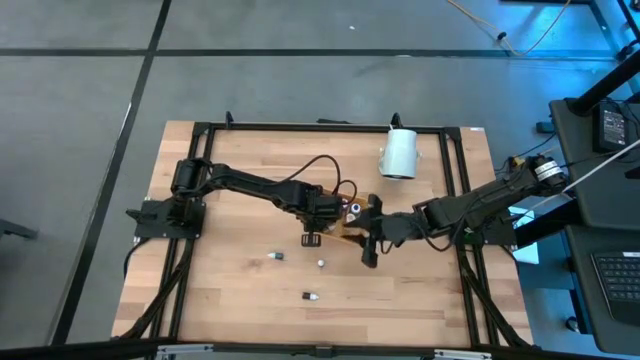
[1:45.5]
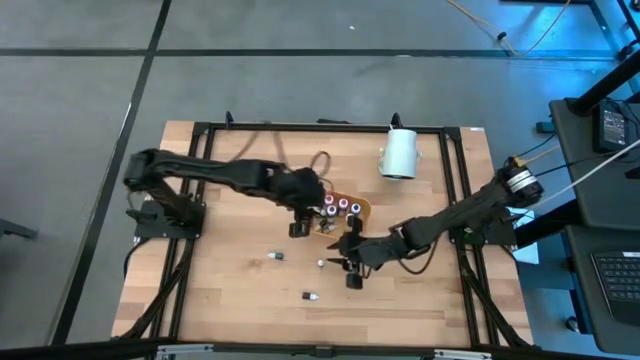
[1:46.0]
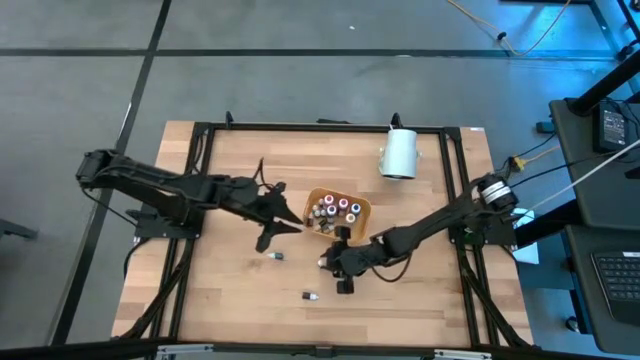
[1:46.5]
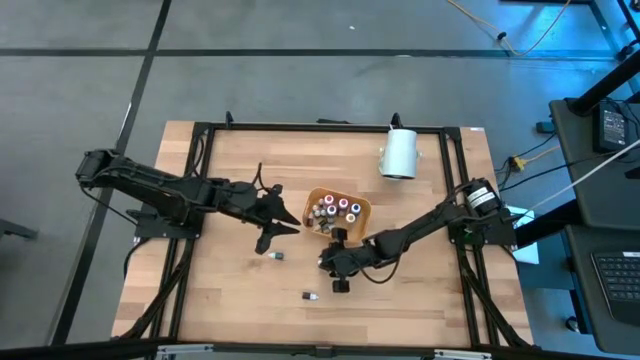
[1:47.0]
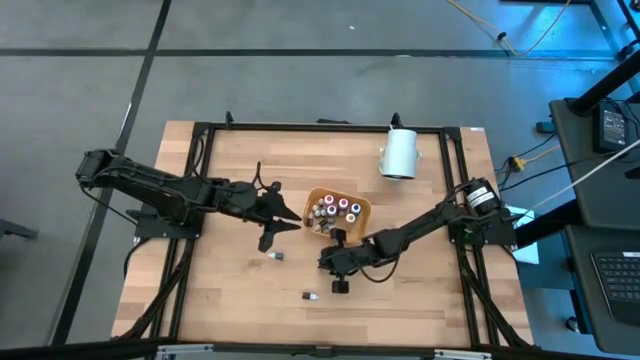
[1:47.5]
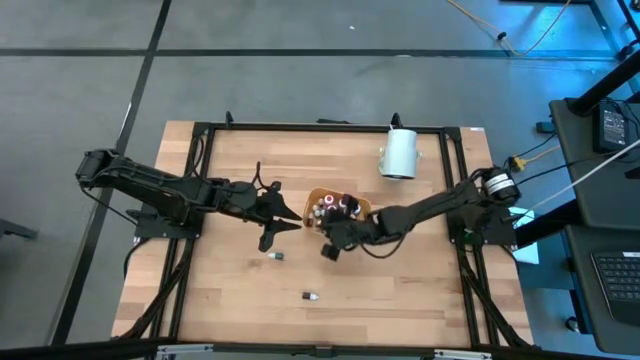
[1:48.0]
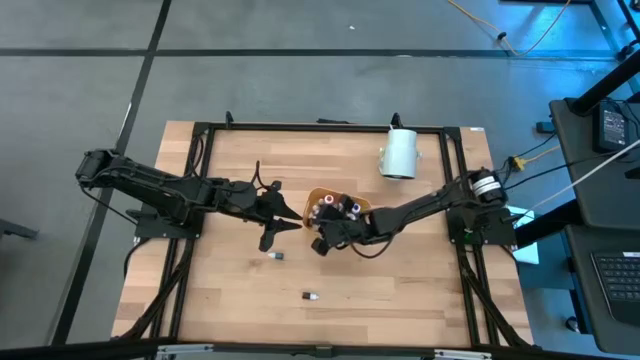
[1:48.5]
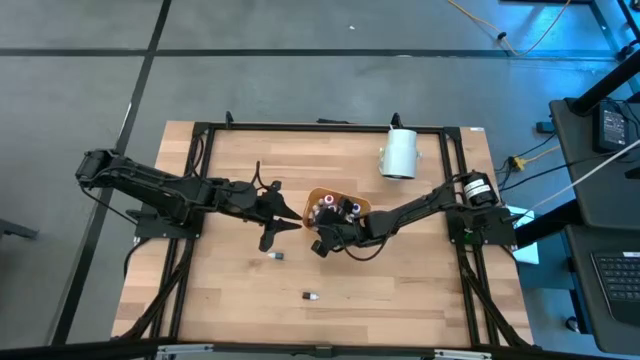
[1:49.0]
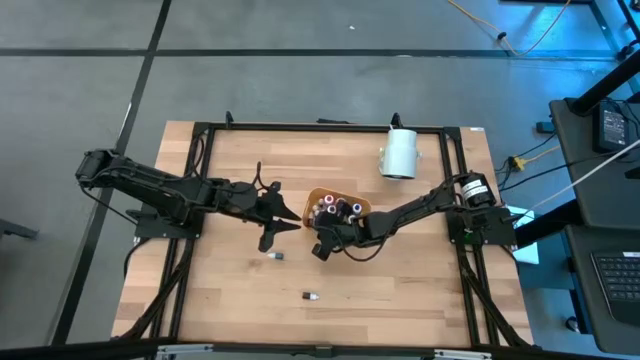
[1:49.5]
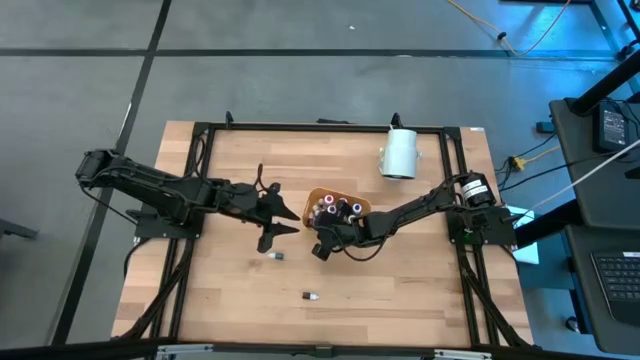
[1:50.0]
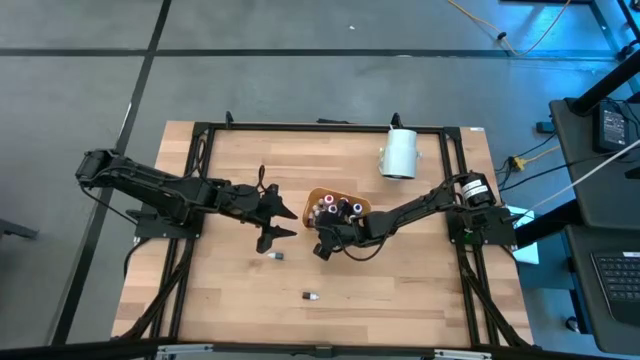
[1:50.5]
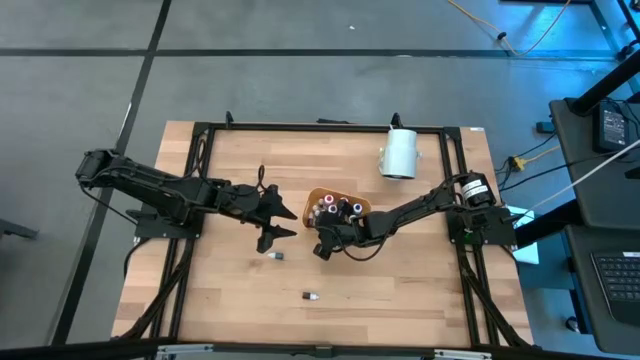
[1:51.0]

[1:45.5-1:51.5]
Task: Pick & Place food coloring
Put the small pink food coloring bottle into the yellow bin

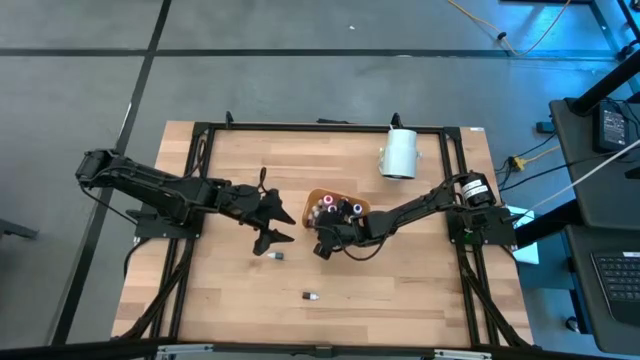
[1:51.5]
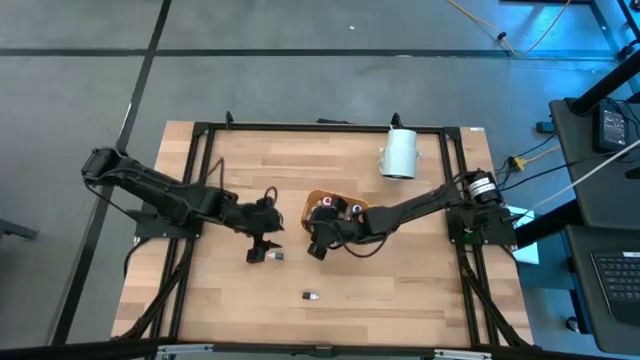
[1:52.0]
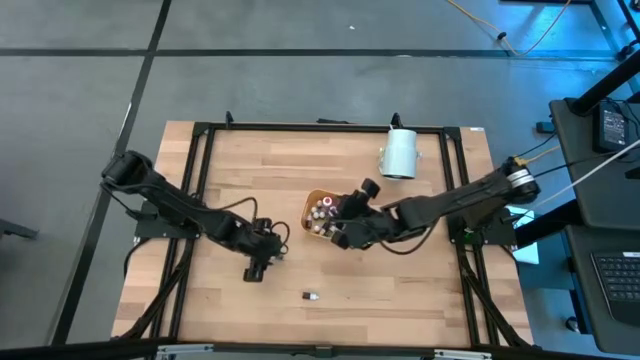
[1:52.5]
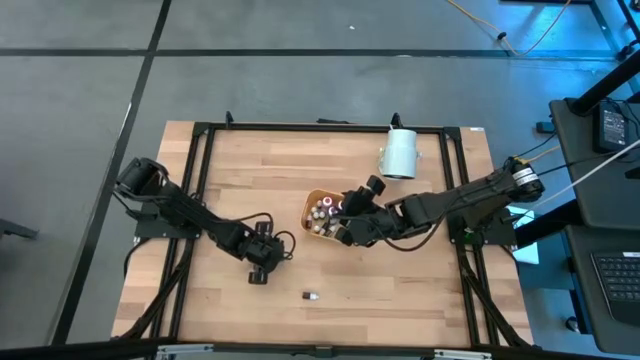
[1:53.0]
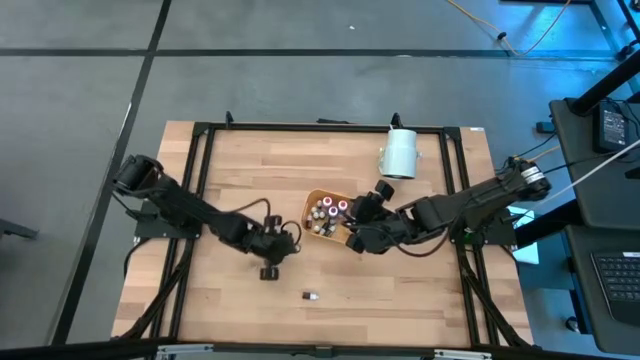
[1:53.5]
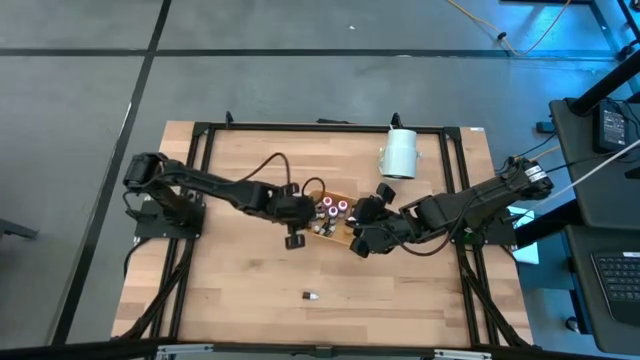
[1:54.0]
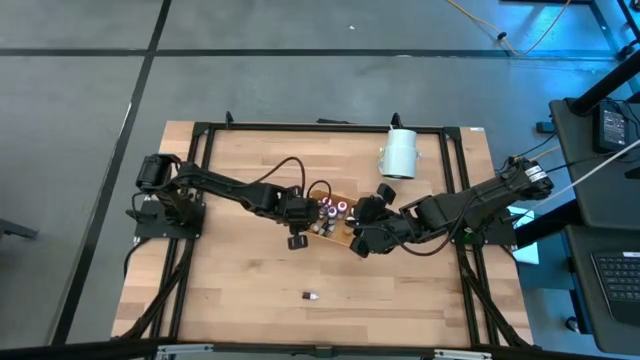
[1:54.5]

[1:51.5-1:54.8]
Put the small blue food coloring bottle into the yellow bin

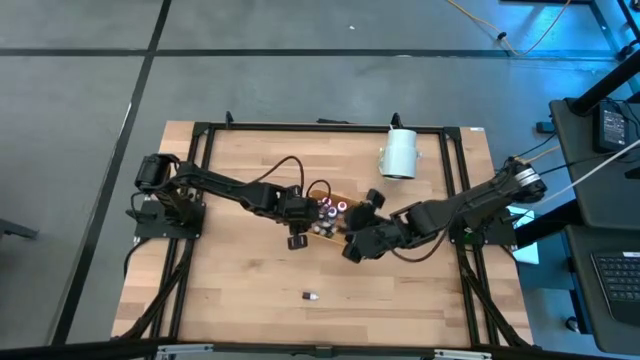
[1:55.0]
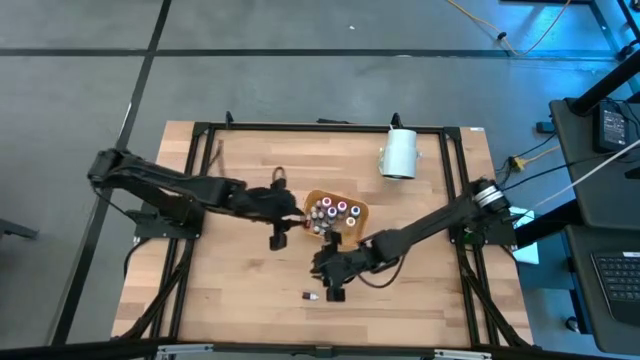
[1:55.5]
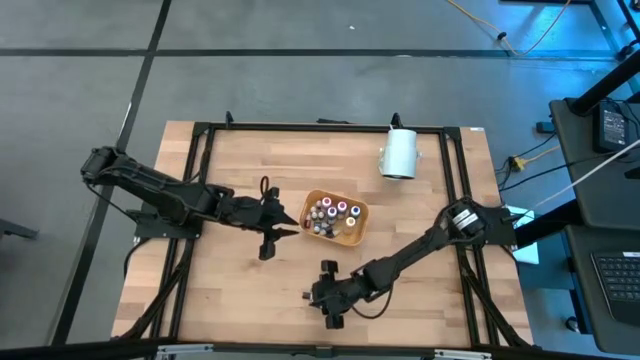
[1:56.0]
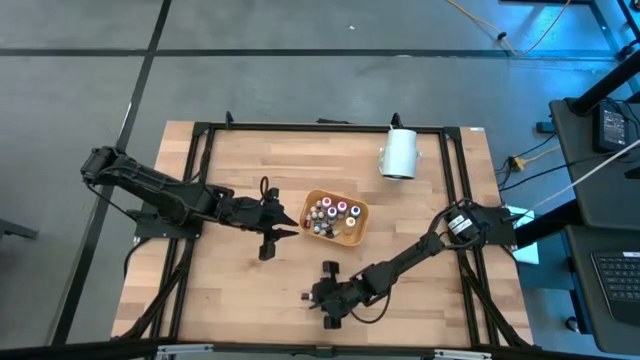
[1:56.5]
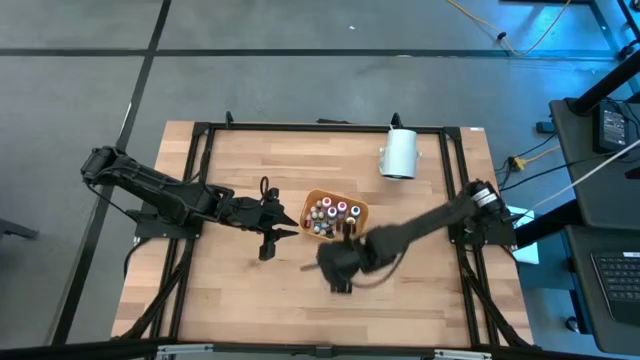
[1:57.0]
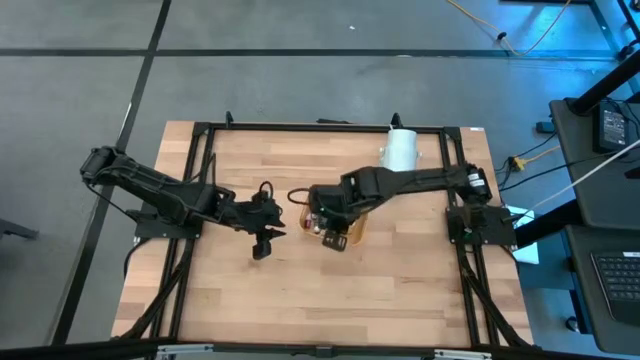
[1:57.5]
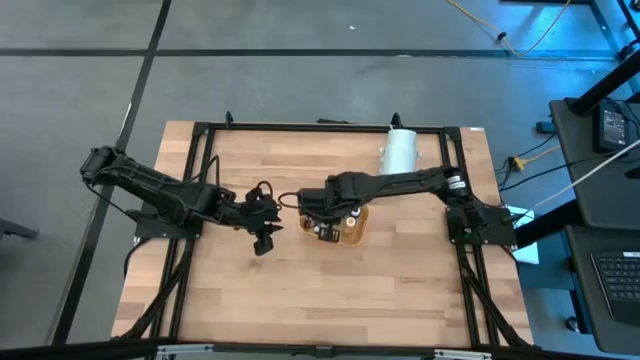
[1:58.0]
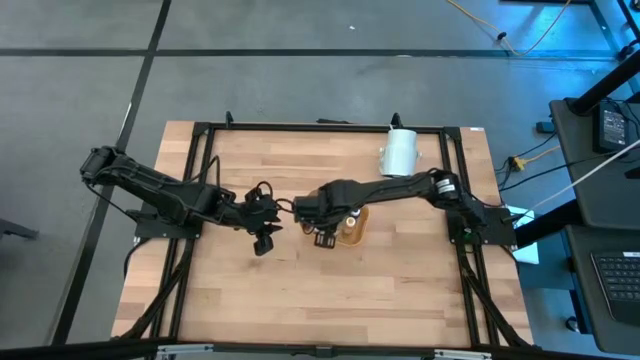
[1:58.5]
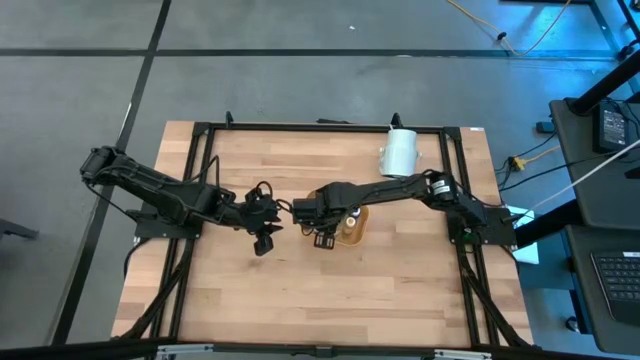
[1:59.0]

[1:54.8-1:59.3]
Put the small red food coloring bottle into the yellow bin

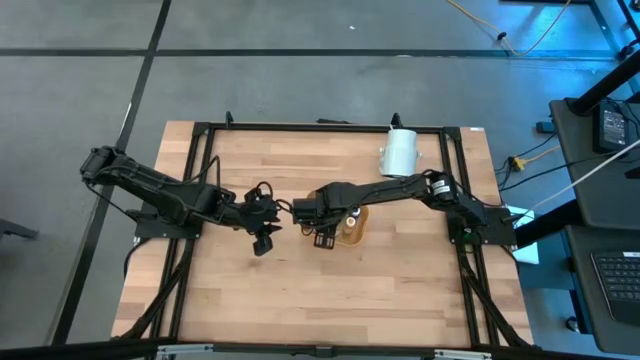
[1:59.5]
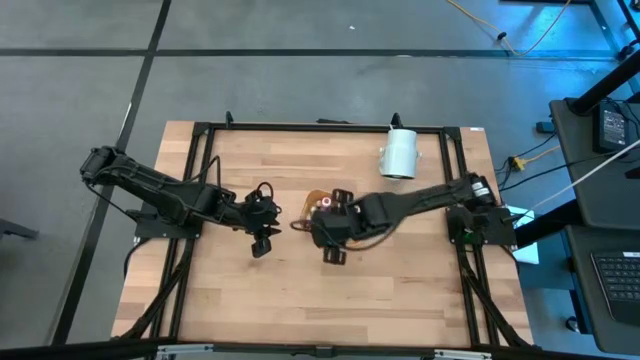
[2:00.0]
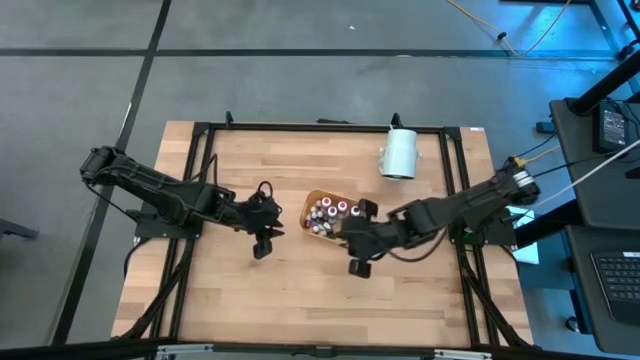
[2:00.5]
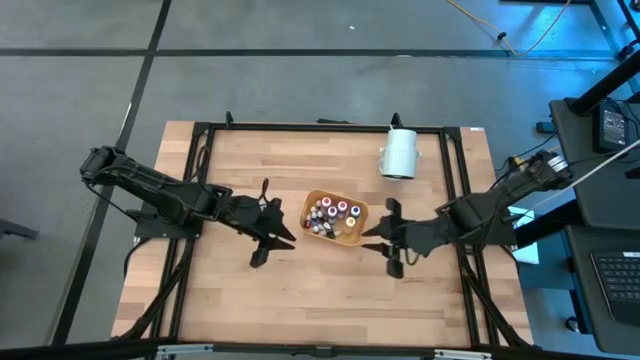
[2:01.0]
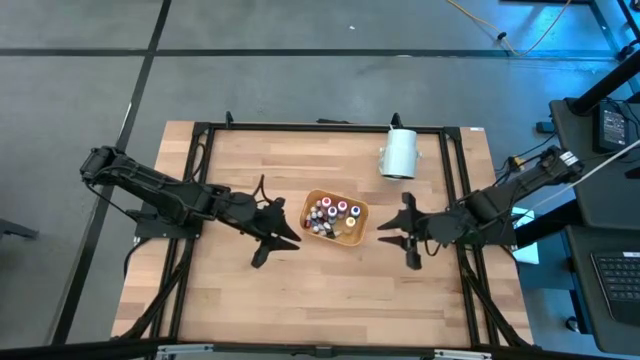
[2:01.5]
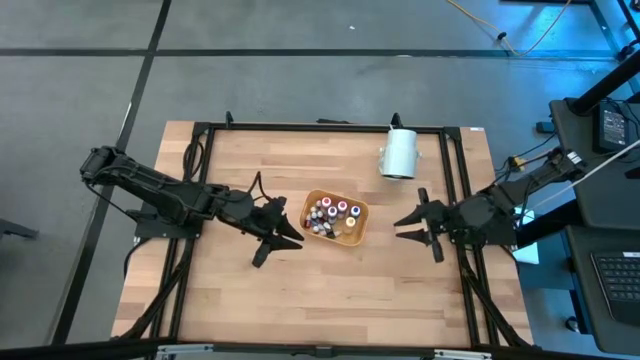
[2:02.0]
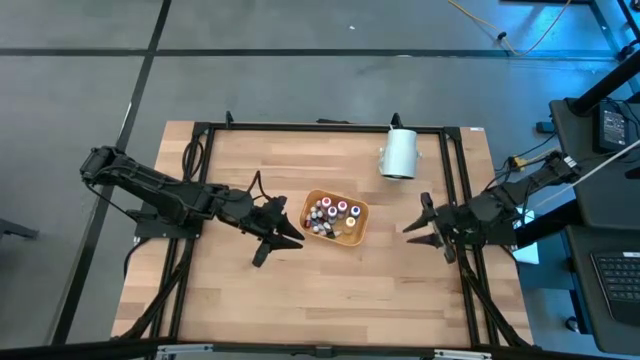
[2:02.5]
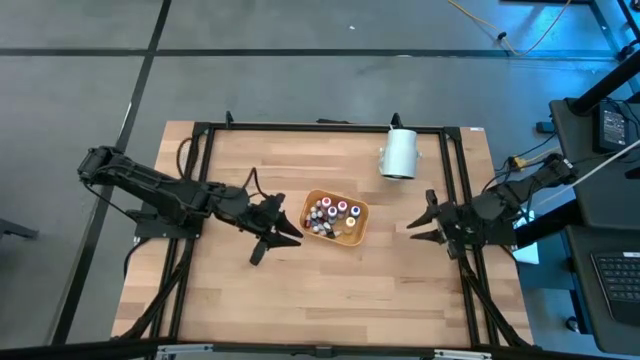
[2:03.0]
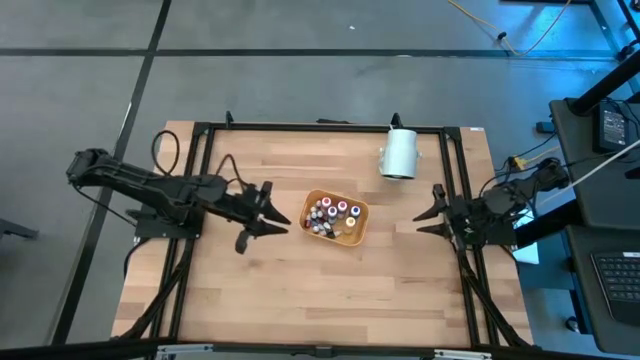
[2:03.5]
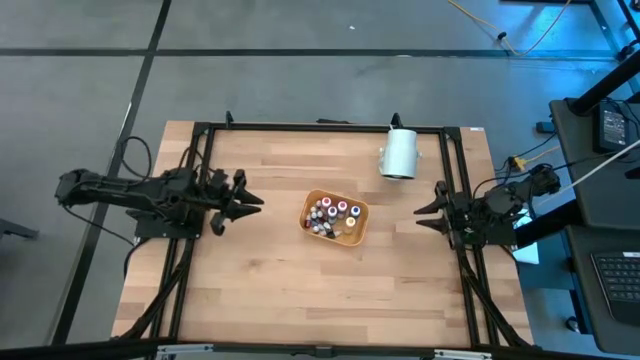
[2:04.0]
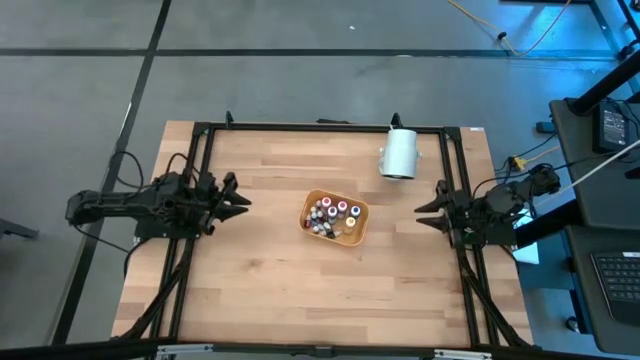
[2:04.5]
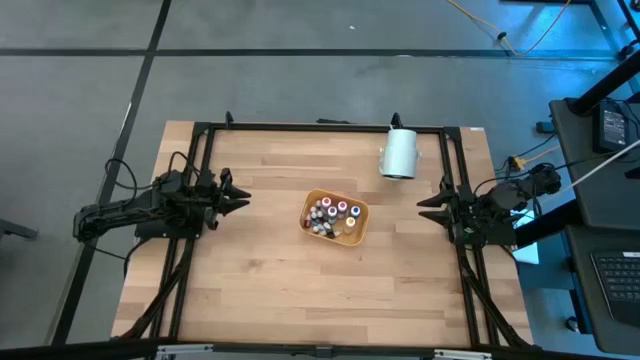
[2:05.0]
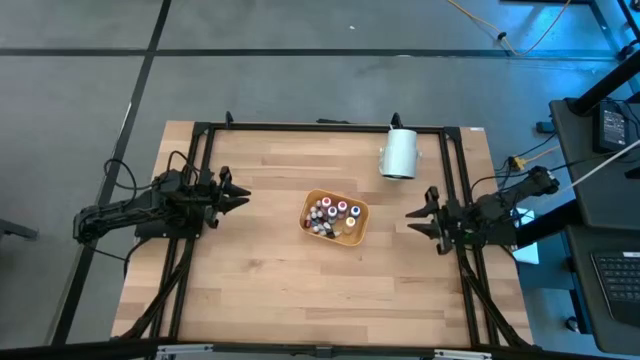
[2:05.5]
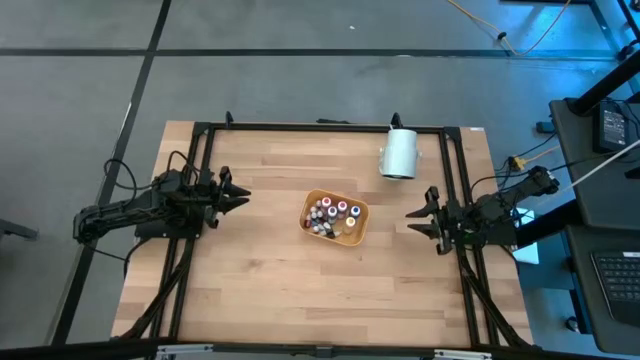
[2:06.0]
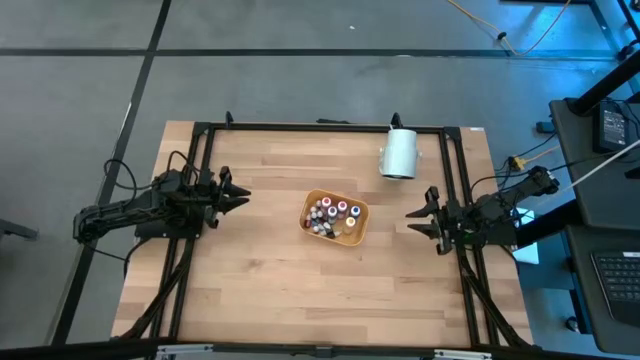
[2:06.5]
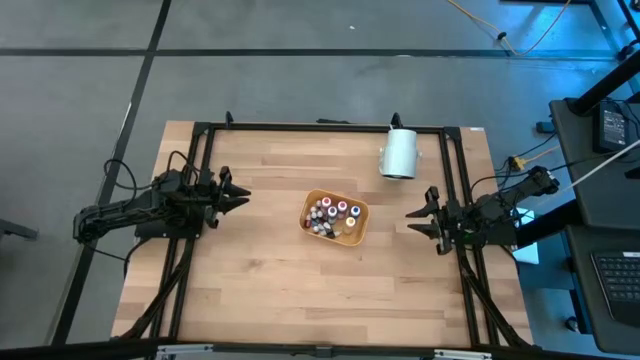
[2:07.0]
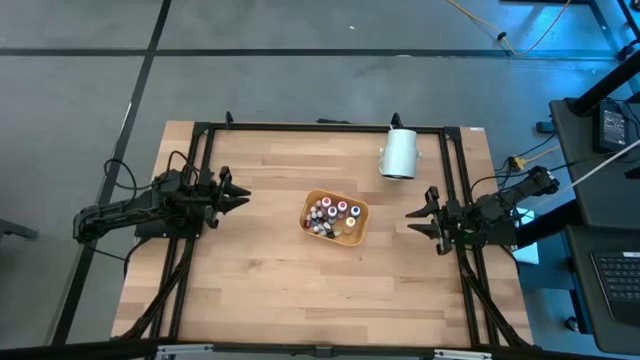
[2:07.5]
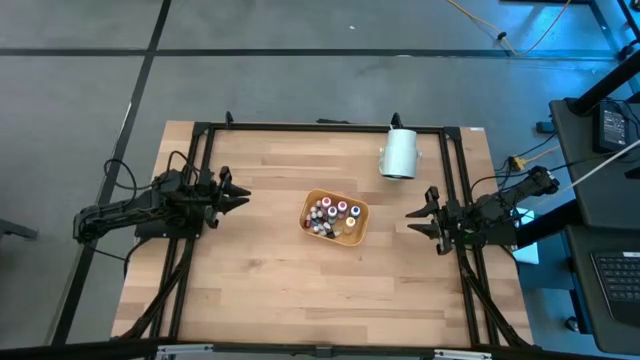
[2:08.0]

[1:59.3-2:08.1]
Return to Home Position
